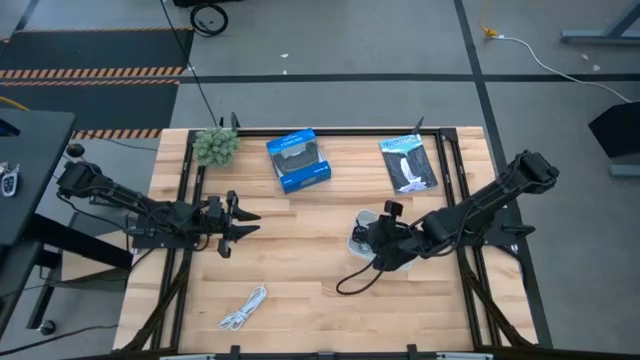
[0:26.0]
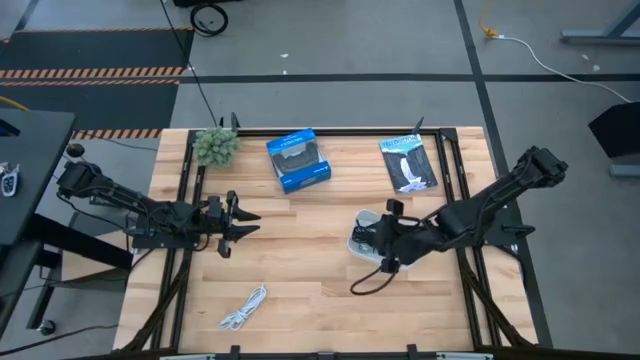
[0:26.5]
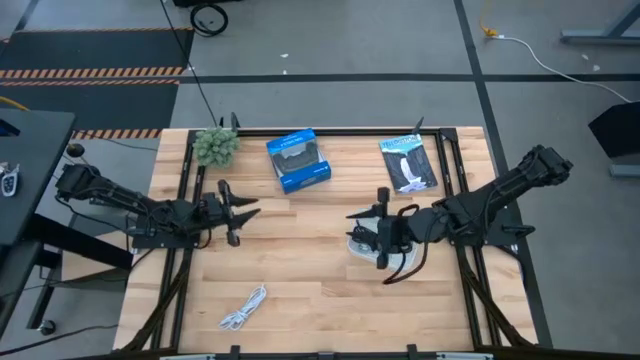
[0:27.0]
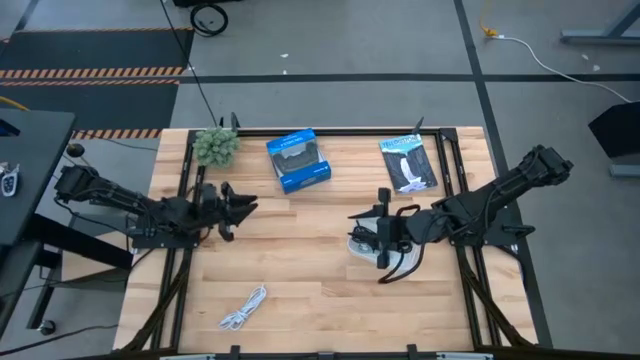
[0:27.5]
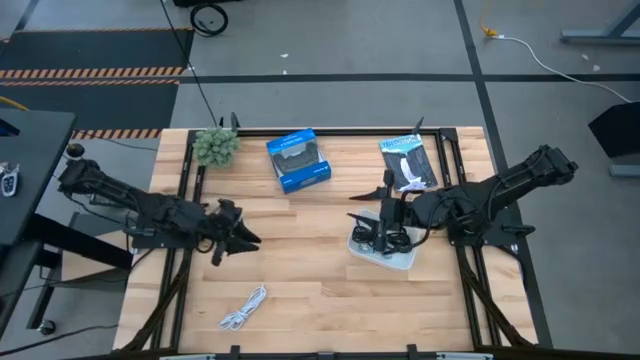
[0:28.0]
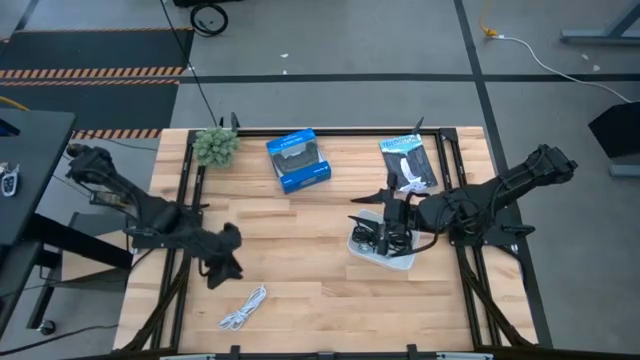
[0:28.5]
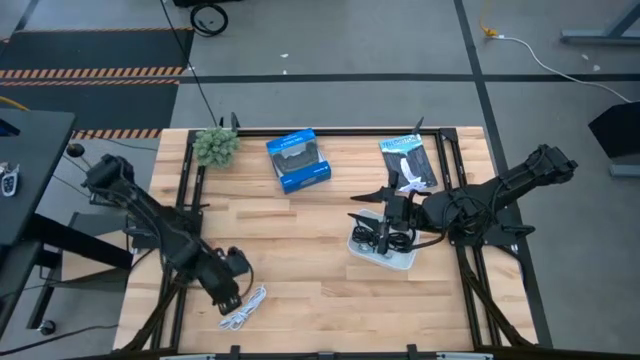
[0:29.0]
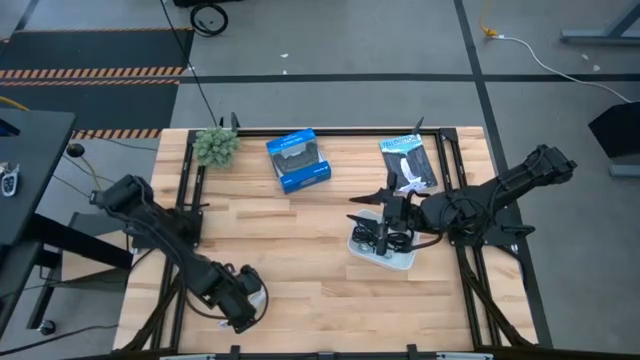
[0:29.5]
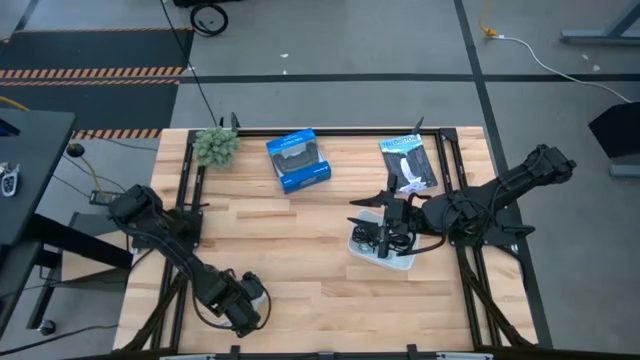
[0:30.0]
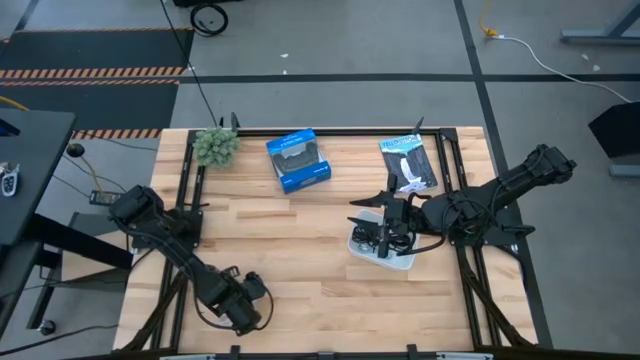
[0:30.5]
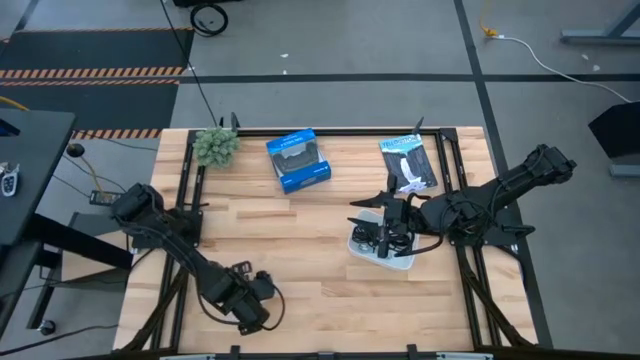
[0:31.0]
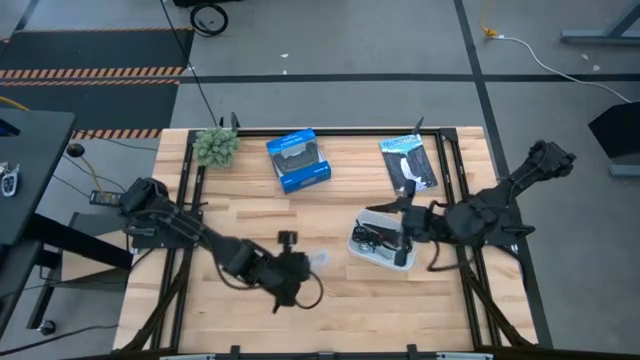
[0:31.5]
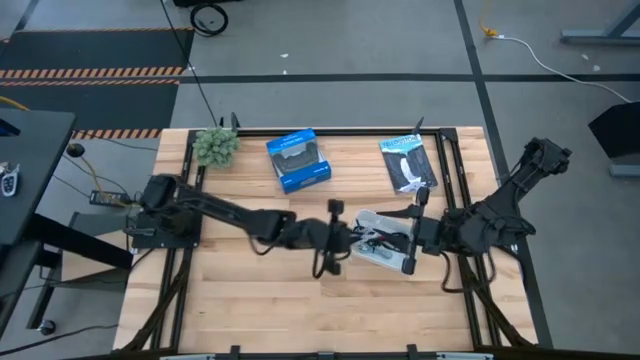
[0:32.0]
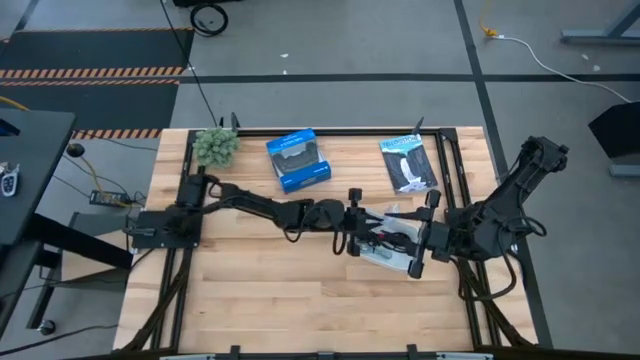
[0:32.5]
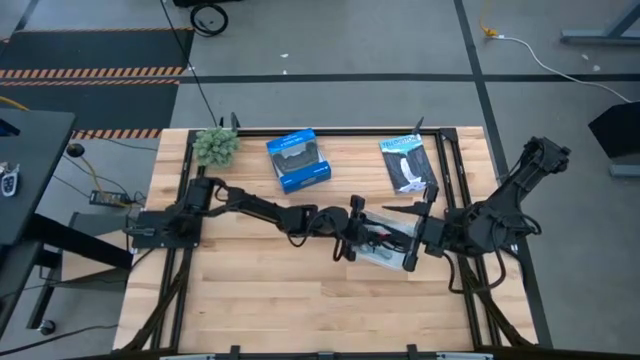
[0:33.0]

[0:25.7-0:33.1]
Task: Pick and place USB-C Cables
Put the white charger cable into the white bin

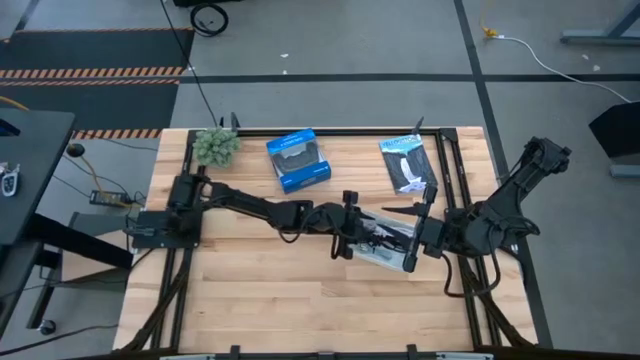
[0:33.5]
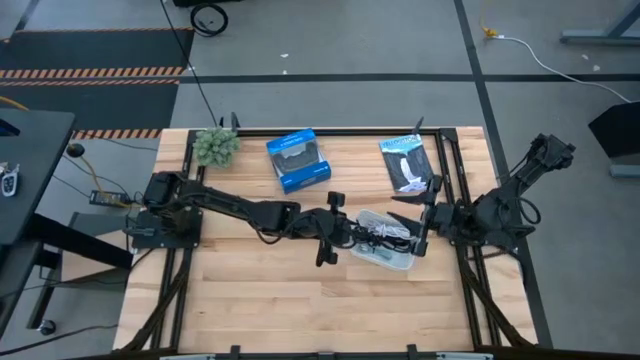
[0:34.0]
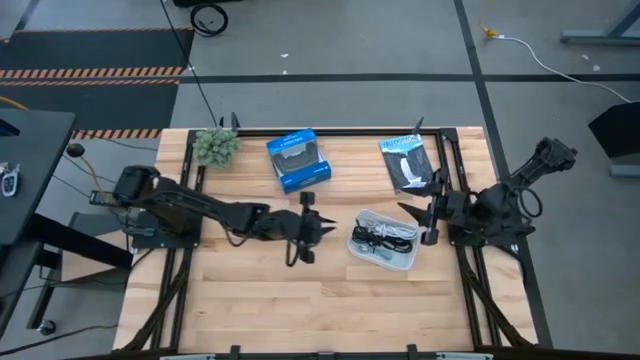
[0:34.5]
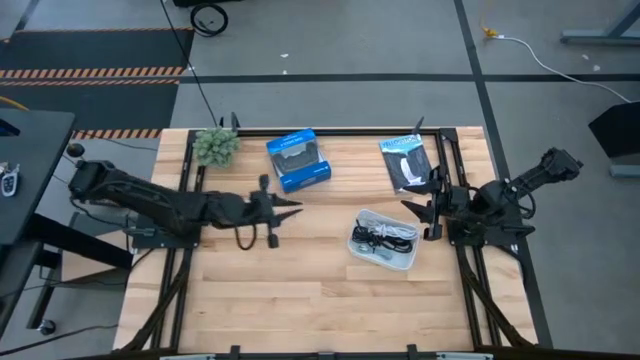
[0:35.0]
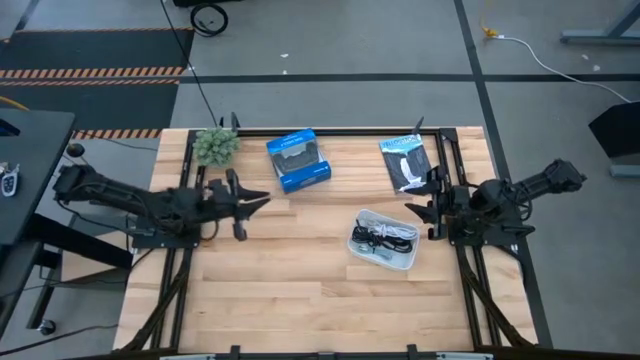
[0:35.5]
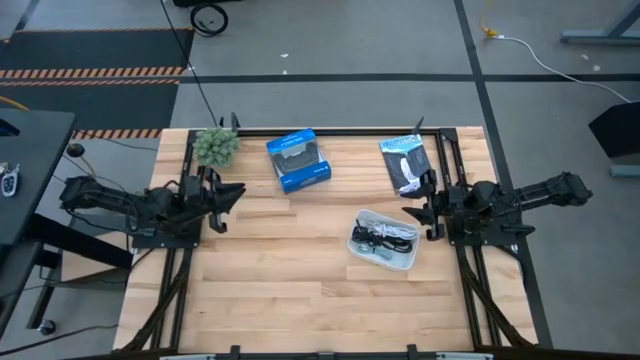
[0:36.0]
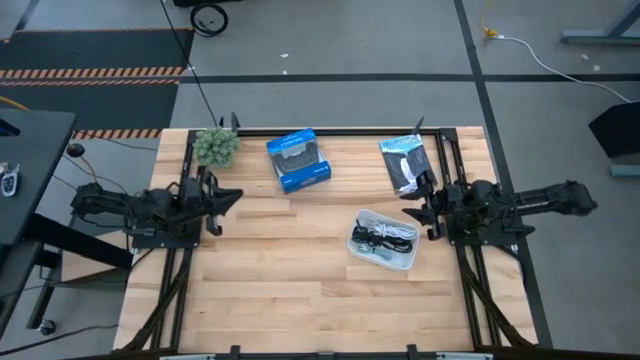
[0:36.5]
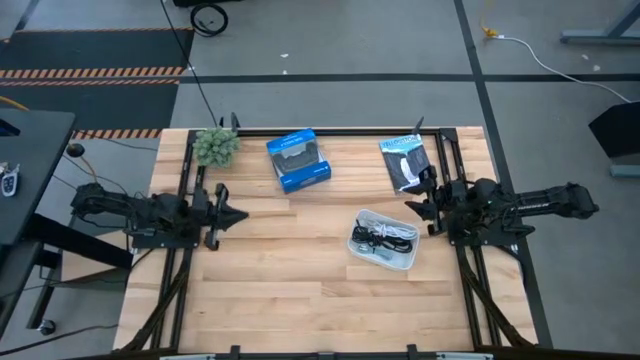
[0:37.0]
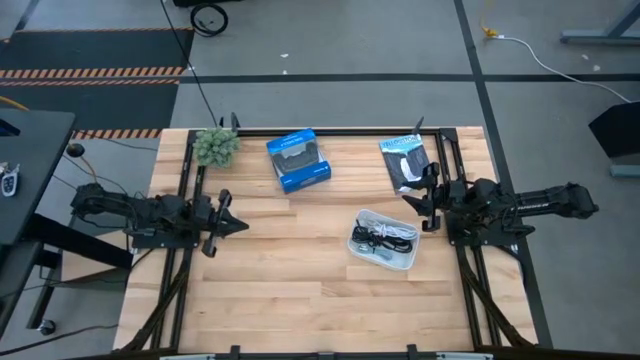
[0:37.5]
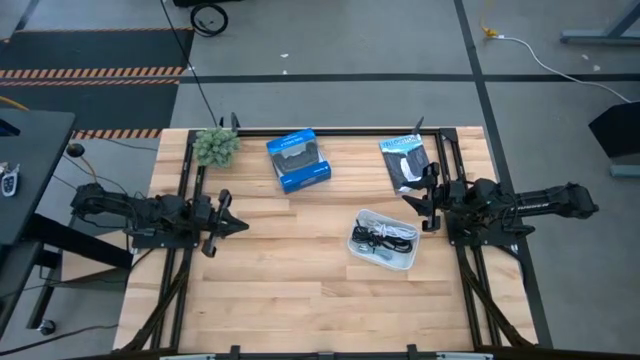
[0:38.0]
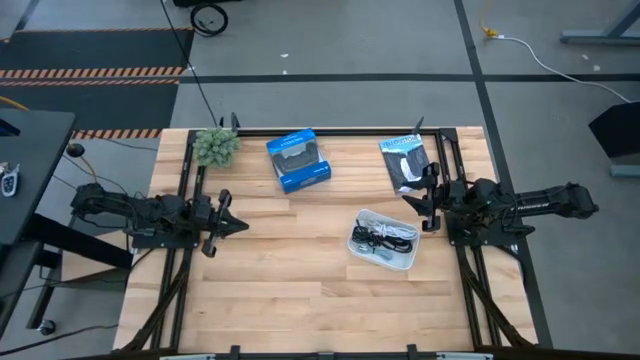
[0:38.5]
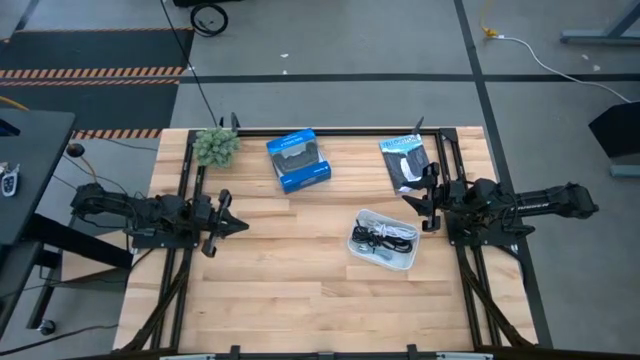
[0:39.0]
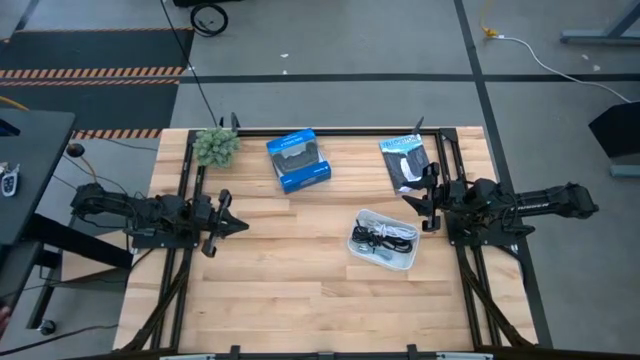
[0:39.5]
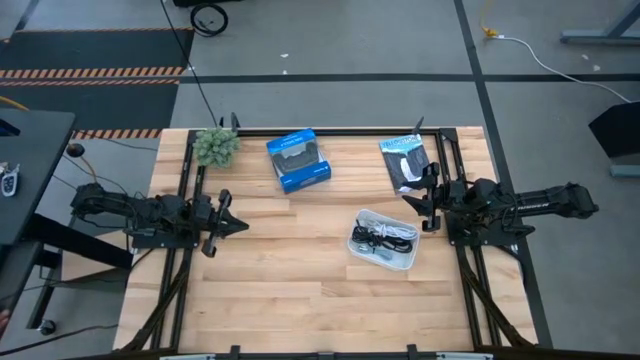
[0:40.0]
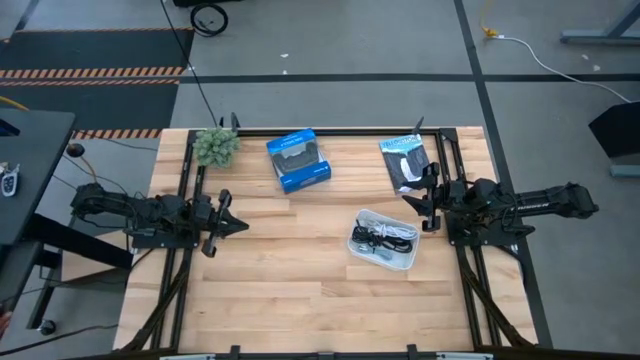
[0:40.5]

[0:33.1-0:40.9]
Return to Home Position

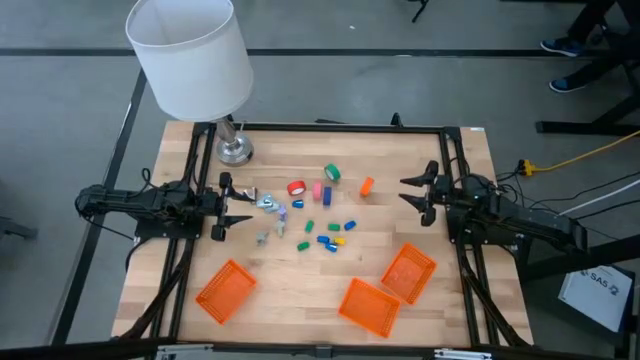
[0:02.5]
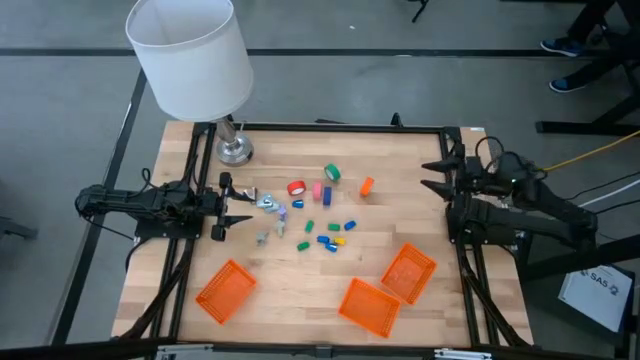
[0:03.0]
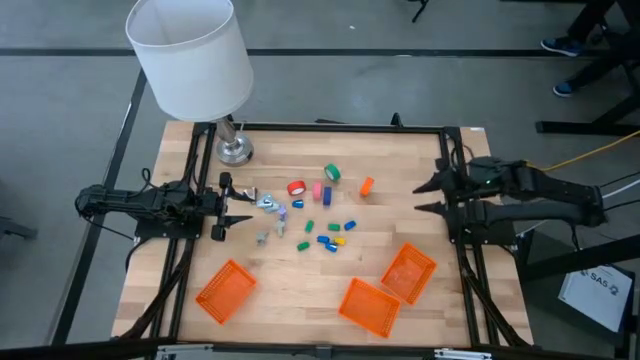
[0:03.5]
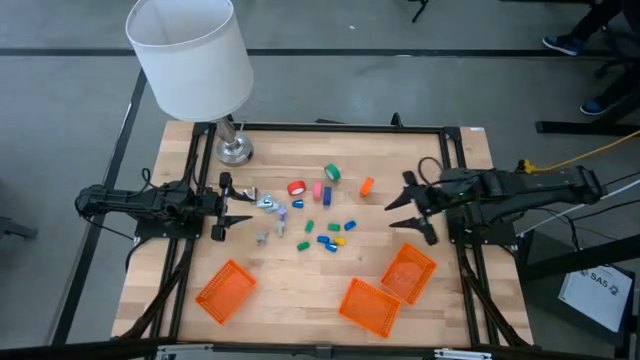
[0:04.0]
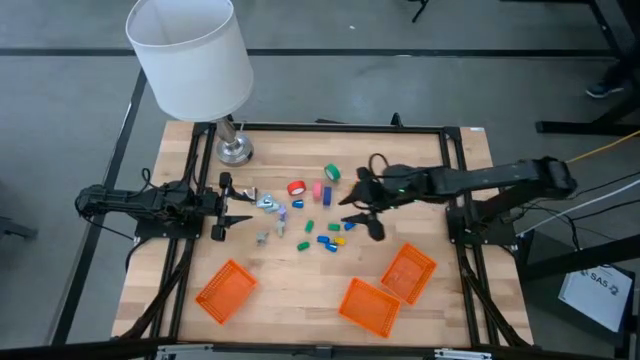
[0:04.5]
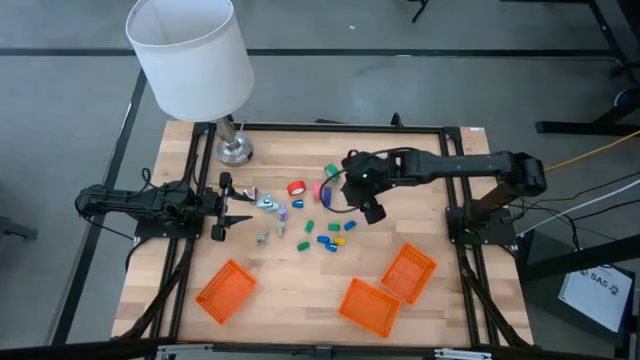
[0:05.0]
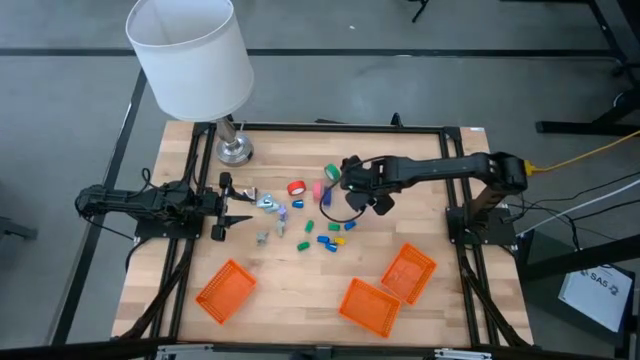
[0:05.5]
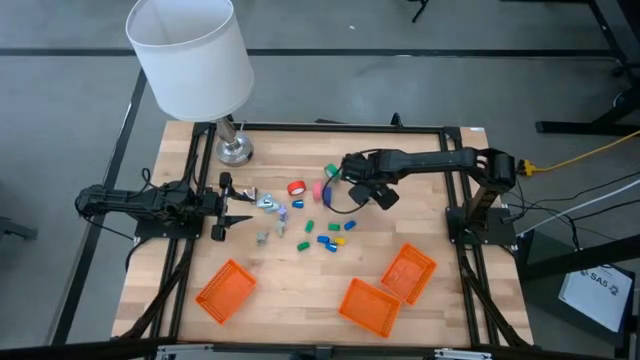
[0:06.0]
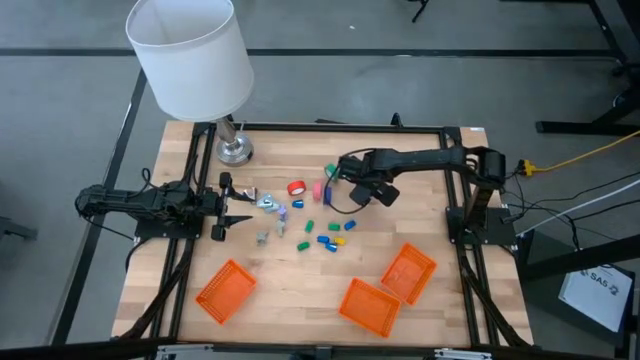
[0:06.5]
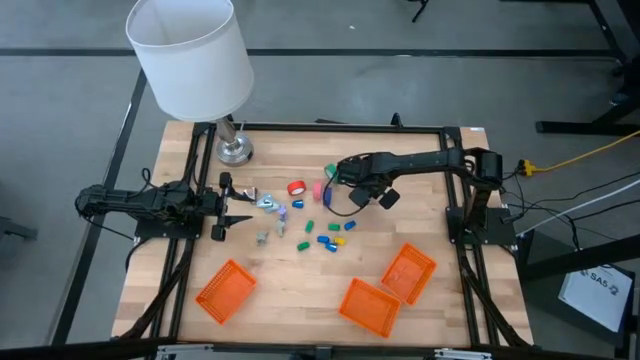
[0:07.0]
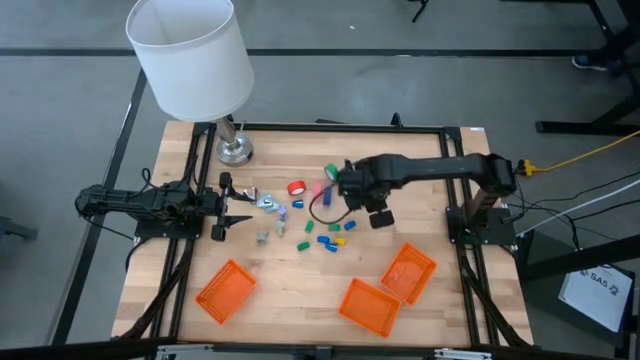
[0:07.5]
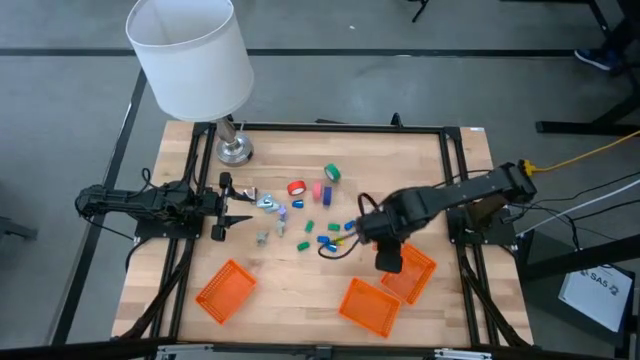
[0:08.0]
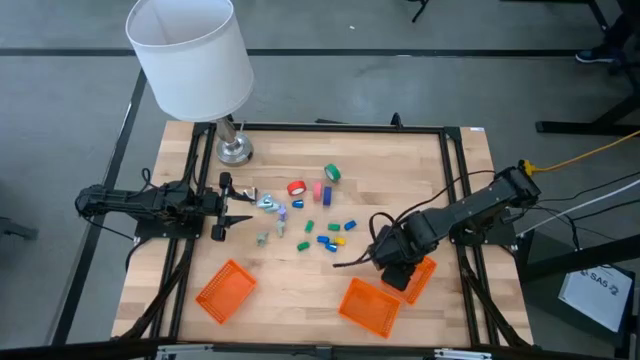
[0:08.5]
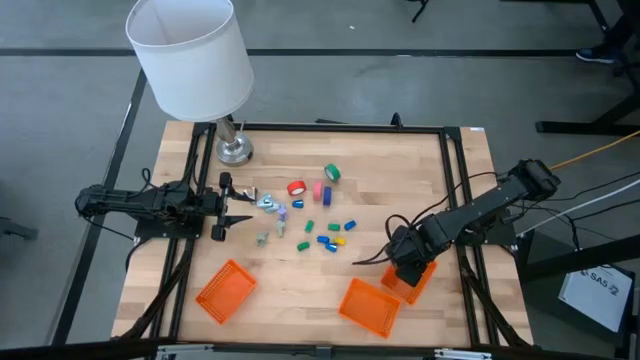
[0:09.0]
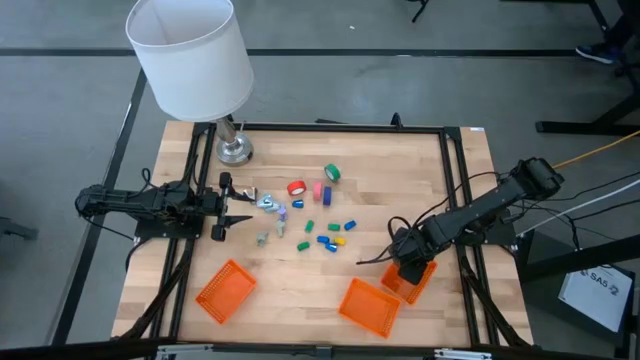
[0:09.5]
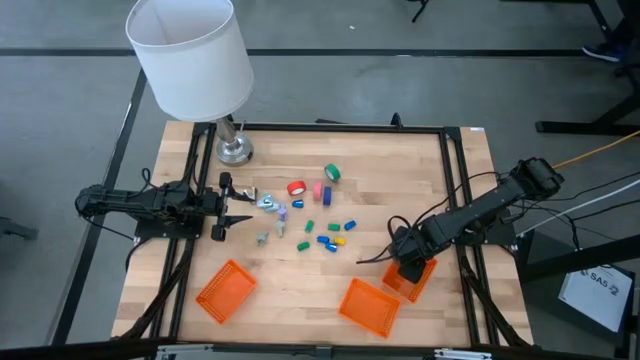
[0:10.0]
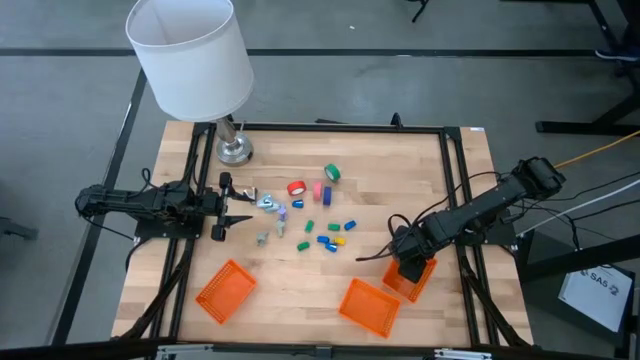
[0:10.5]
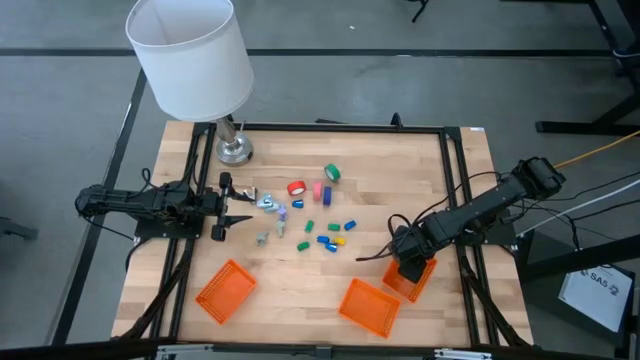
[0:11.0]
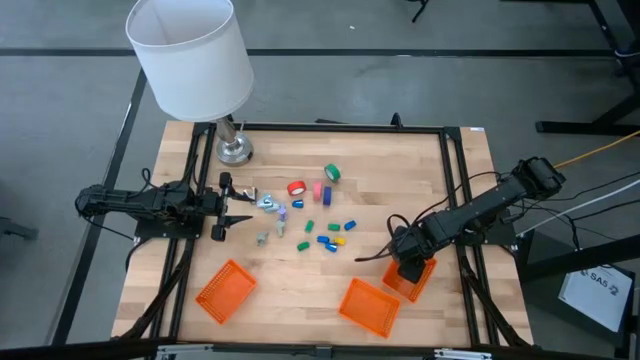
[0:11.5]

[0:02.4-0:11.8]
Task: Pick and place Stapler, Stapler remover, tape
Put the orange tape into the right orange bin
